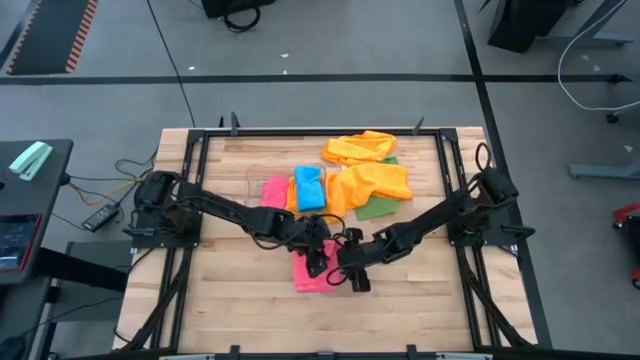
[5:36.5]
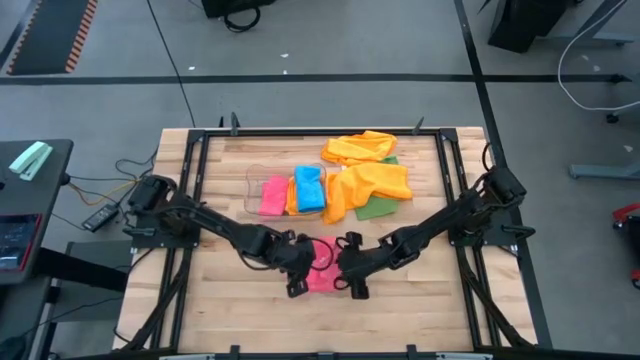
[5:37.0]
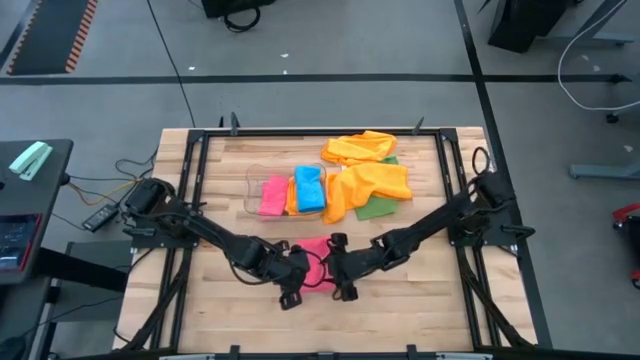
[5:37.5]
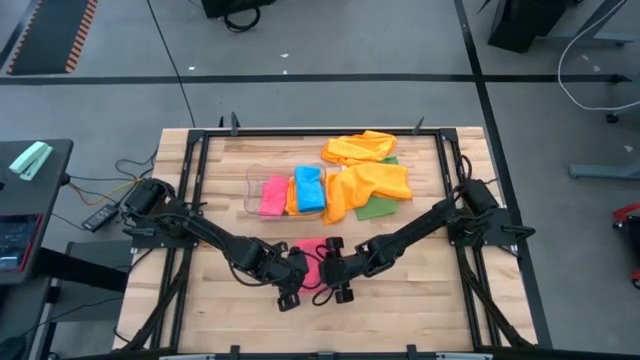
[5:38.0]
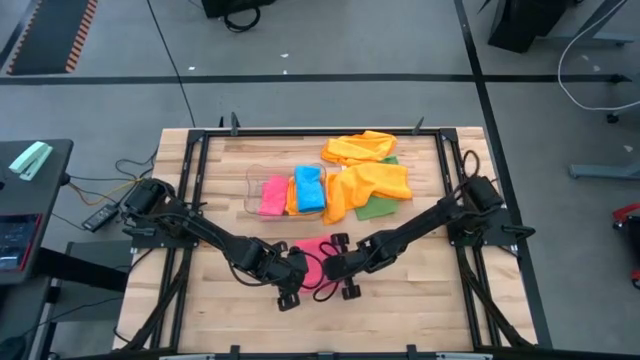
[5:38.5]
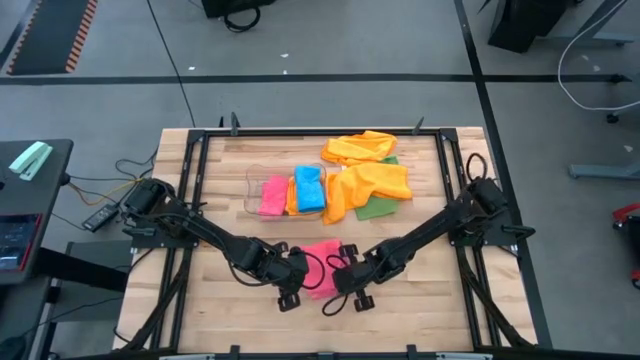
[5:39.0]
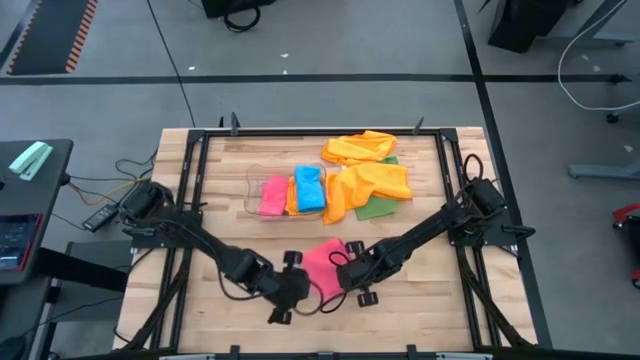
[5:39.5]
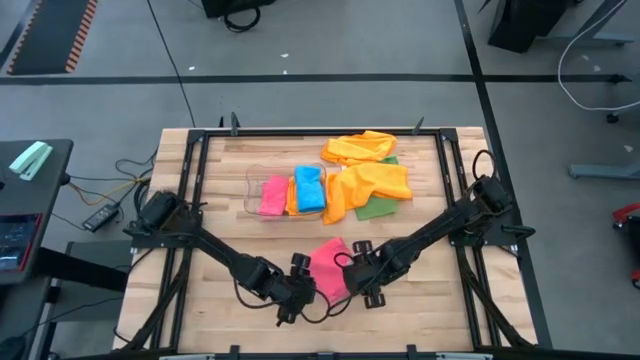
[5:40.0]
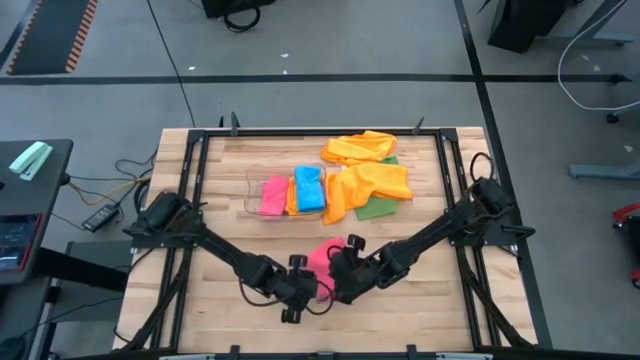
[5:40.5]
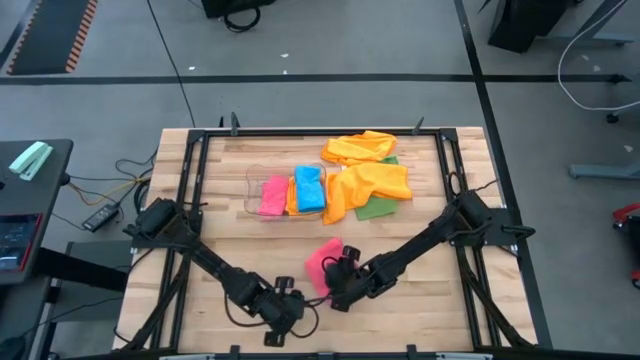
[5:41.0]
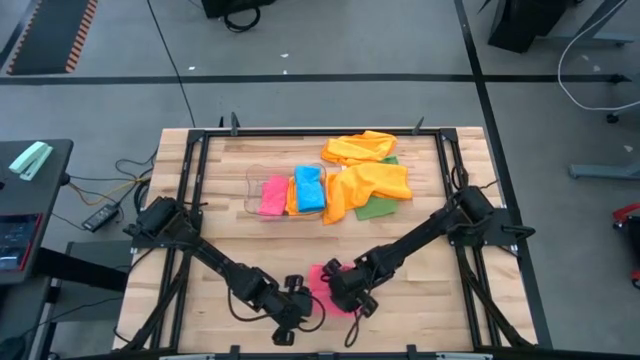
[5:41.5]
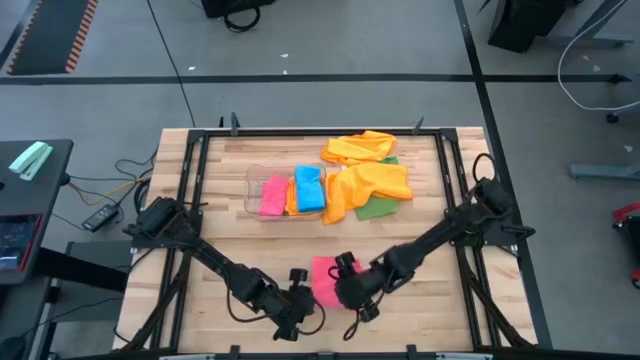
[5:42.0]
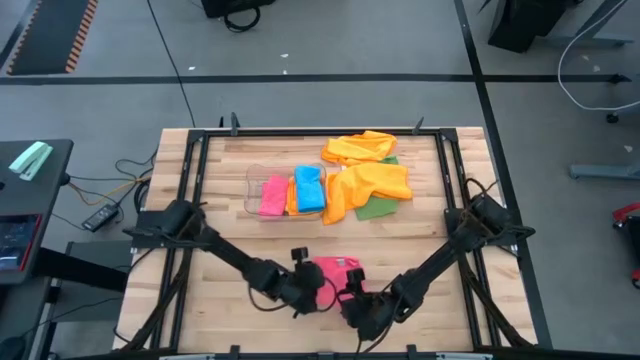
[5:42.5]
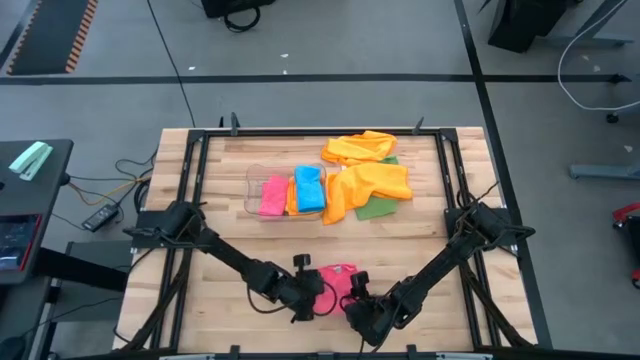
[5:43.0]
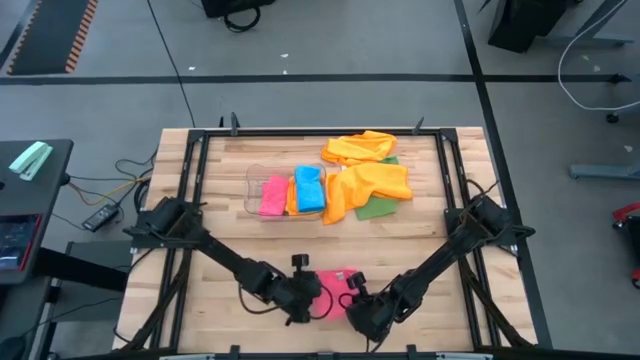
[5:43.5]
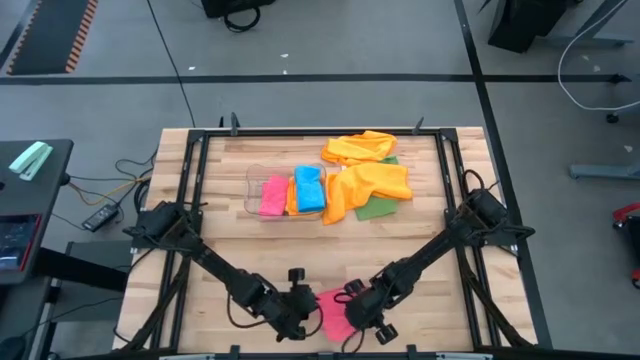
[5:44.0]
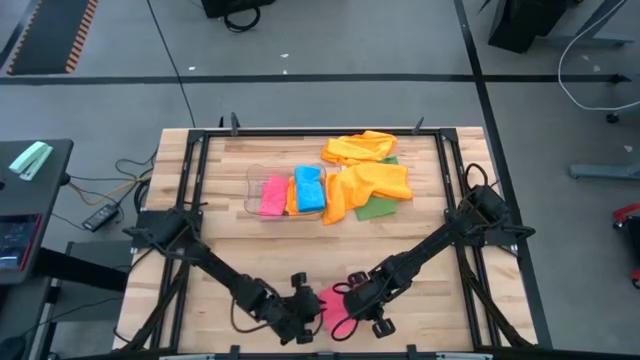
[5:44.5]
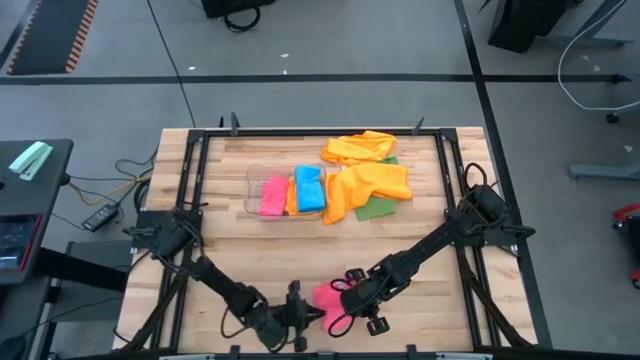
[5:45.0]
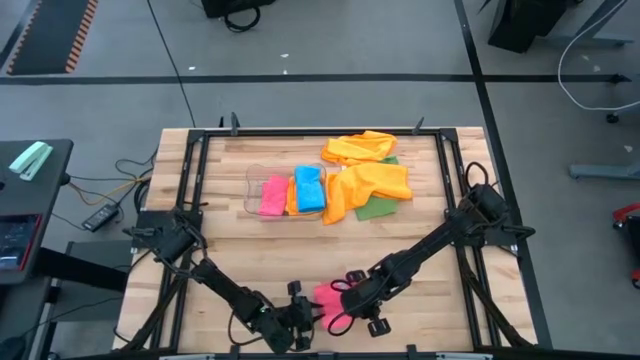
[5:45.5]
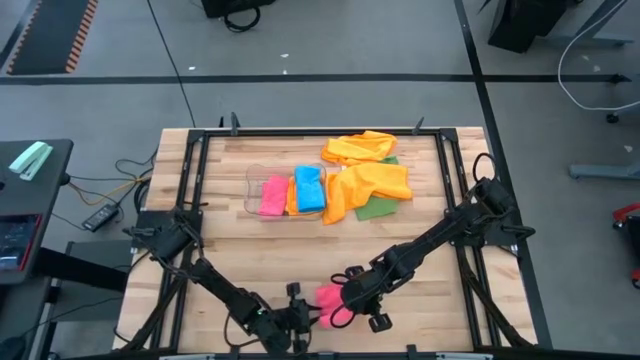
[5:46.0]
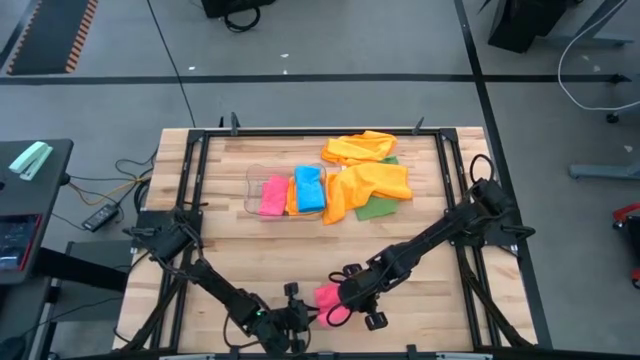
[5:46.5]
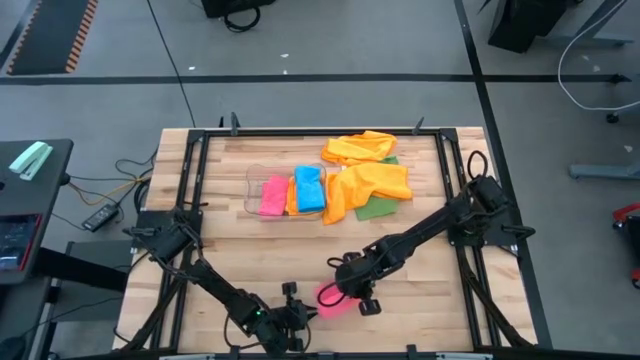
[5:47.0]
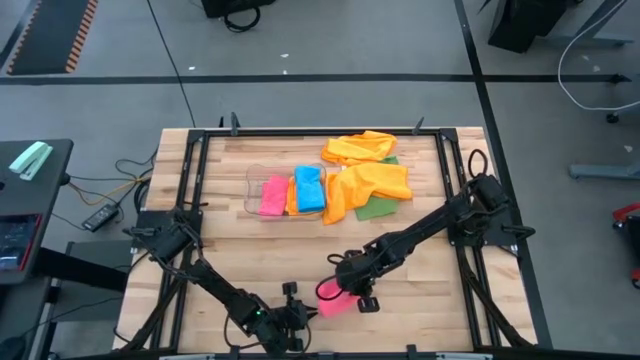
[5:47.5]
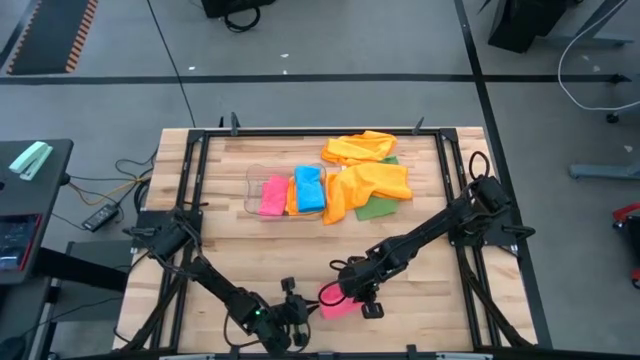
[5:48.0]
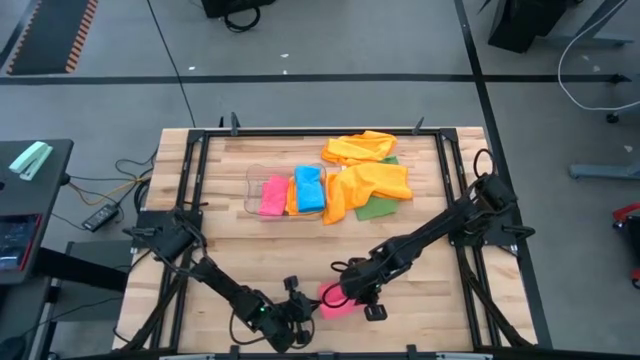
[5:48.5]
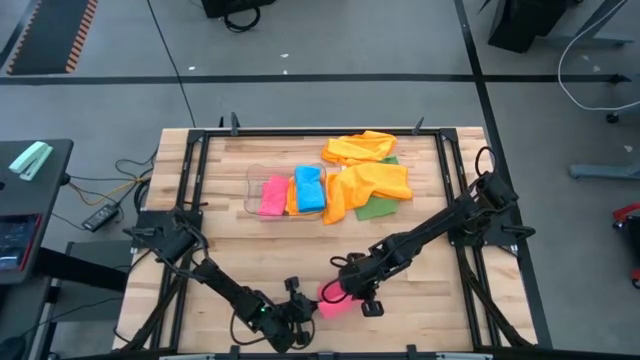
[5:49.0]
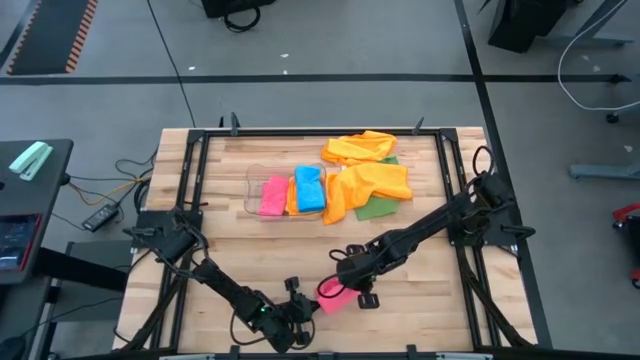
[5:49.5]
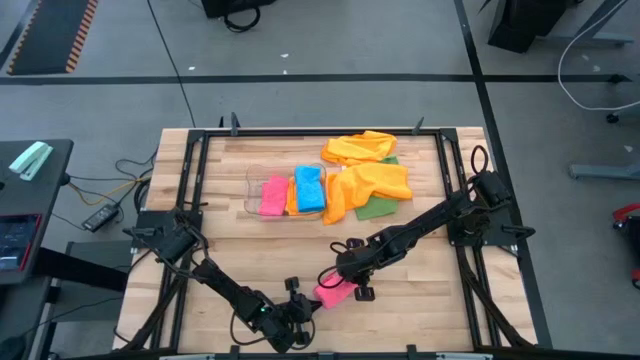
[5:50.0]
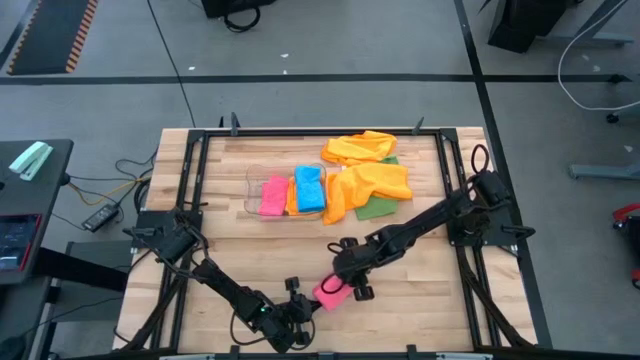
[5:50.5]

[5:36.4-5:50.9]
Task: Fold microfiber towels
Fold the pink microfiber cloth
